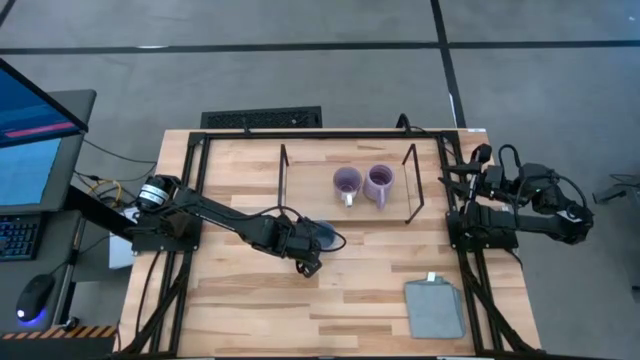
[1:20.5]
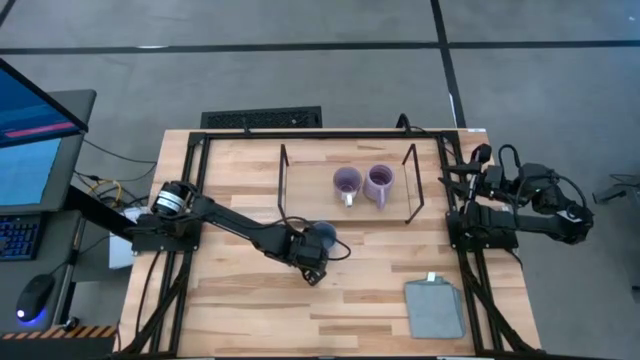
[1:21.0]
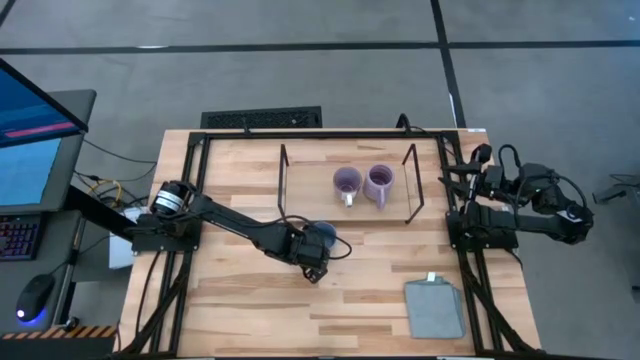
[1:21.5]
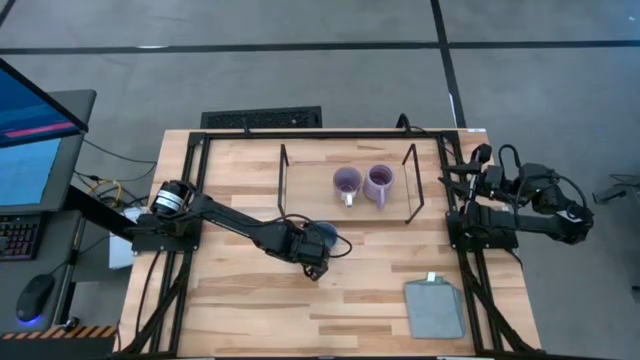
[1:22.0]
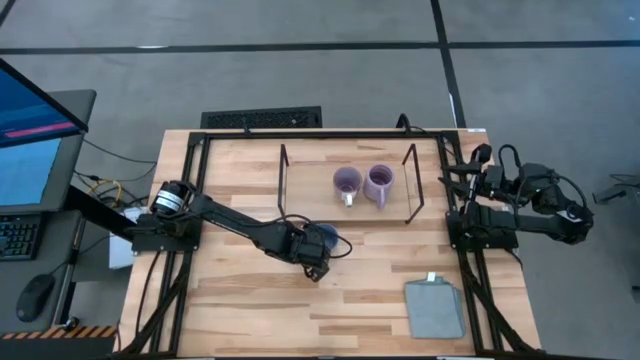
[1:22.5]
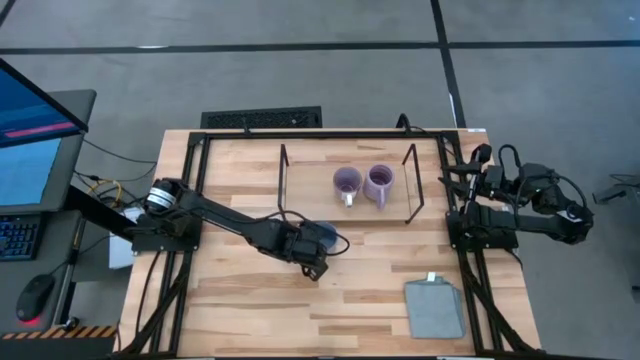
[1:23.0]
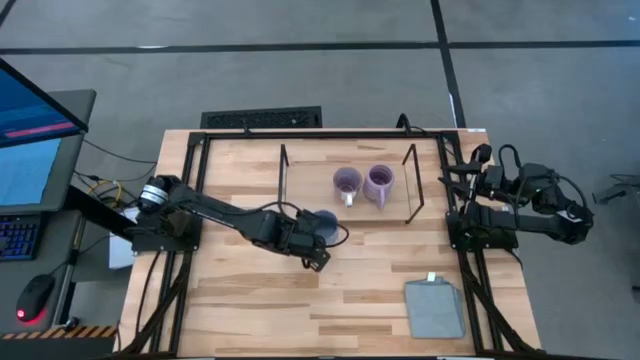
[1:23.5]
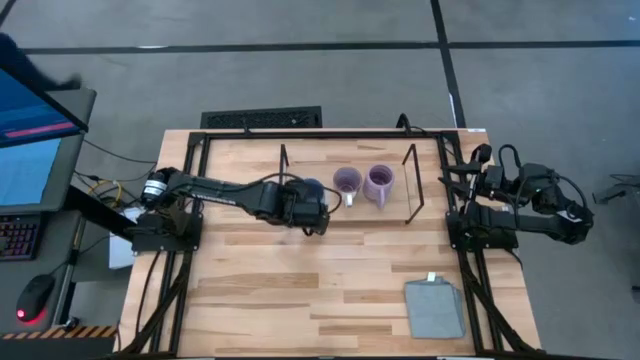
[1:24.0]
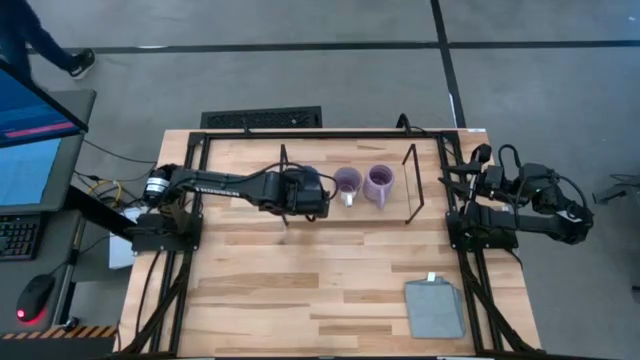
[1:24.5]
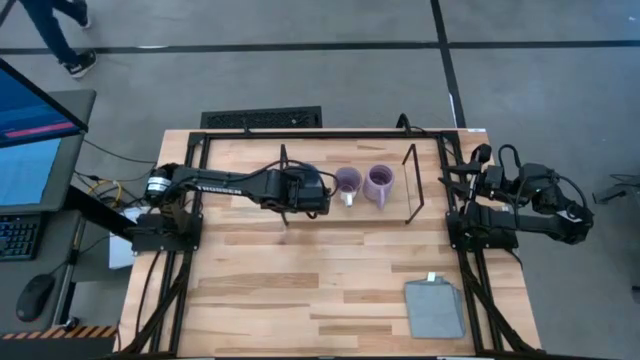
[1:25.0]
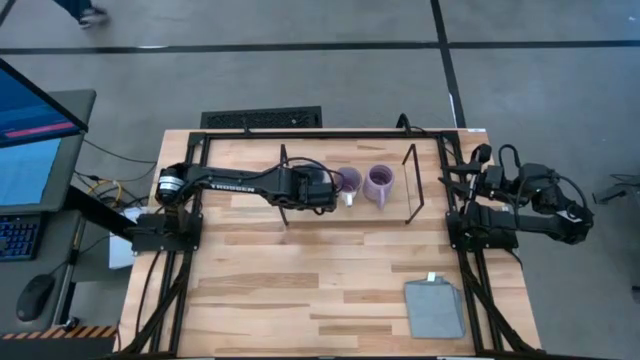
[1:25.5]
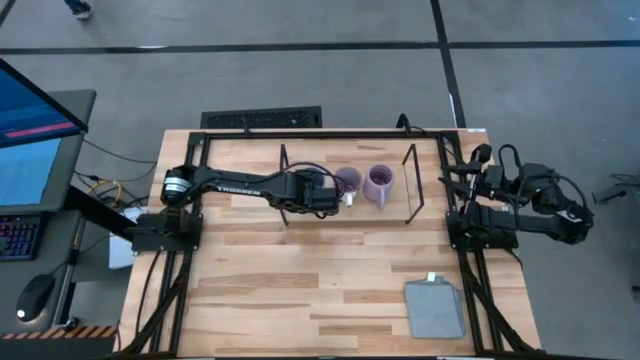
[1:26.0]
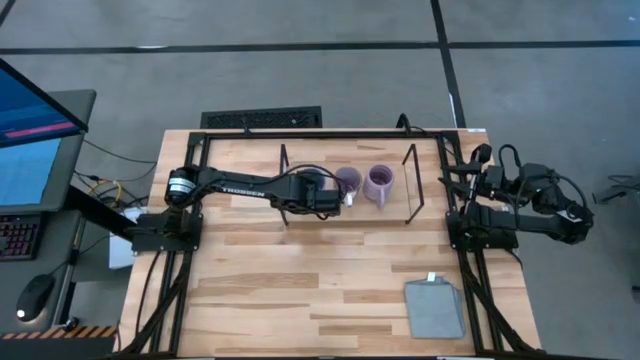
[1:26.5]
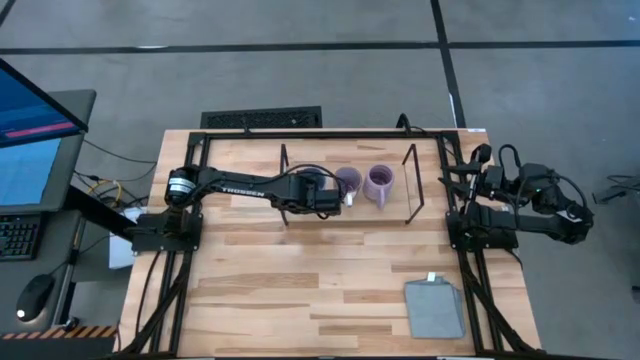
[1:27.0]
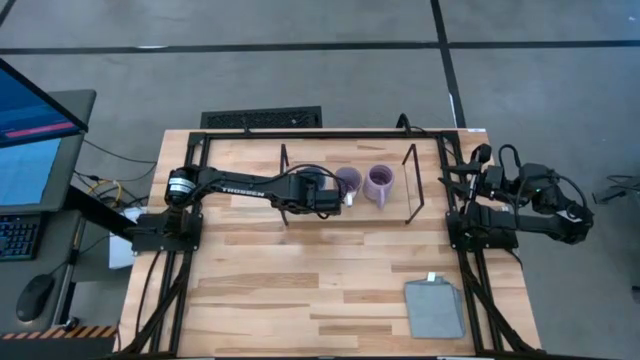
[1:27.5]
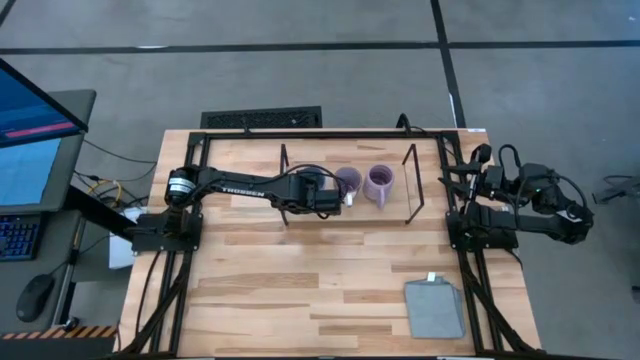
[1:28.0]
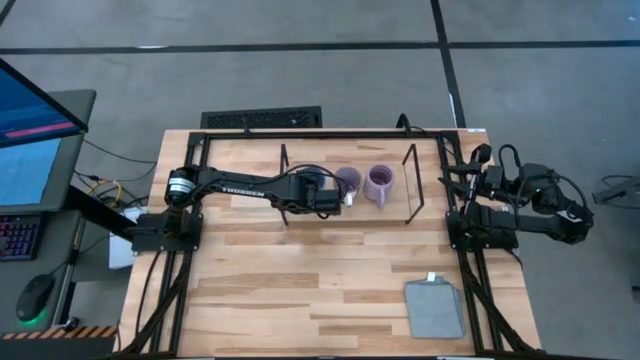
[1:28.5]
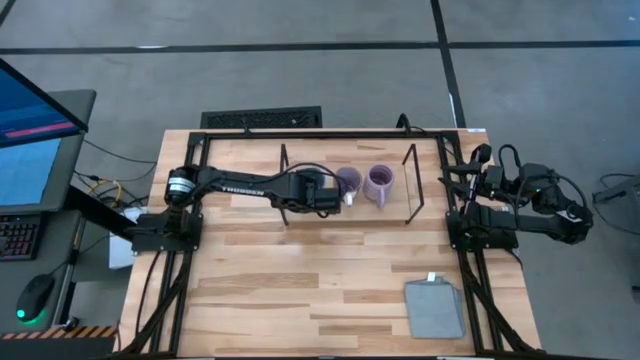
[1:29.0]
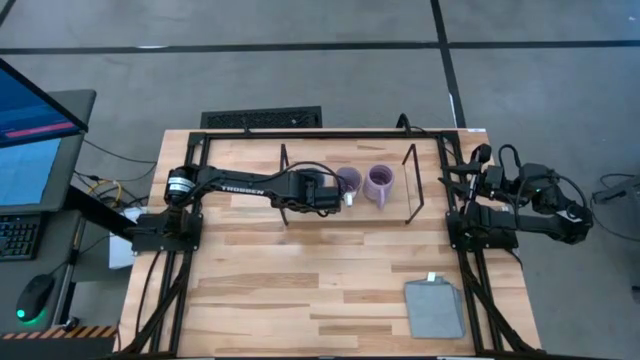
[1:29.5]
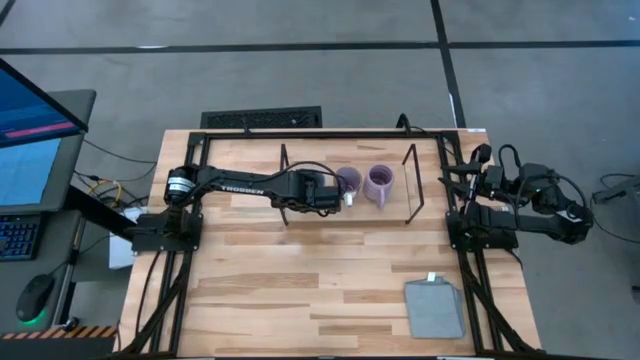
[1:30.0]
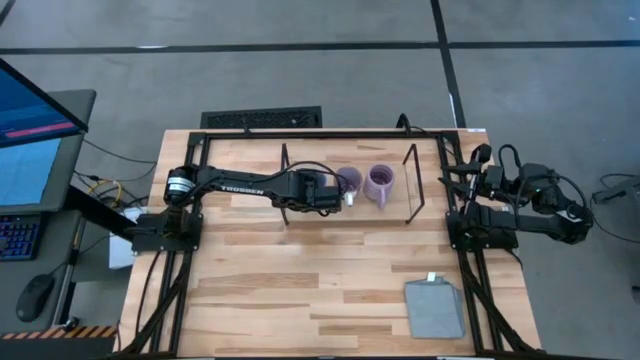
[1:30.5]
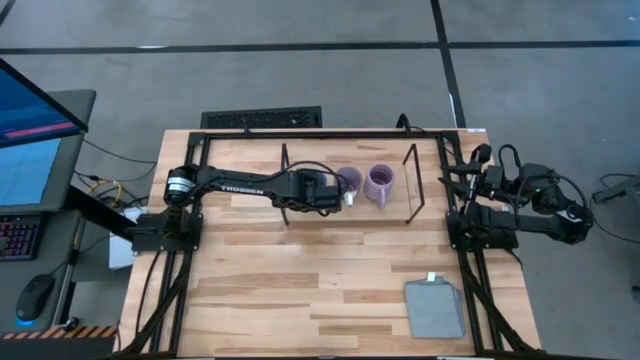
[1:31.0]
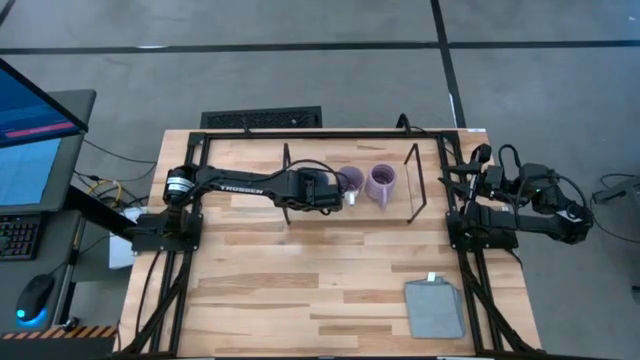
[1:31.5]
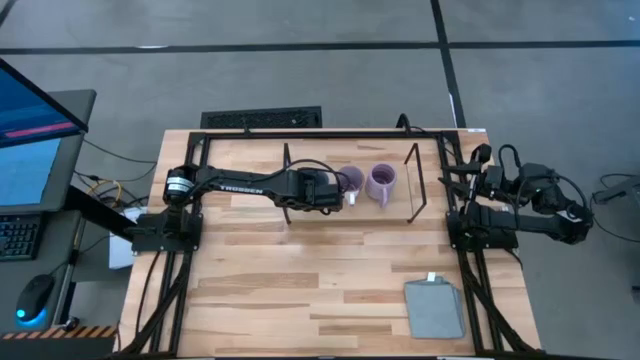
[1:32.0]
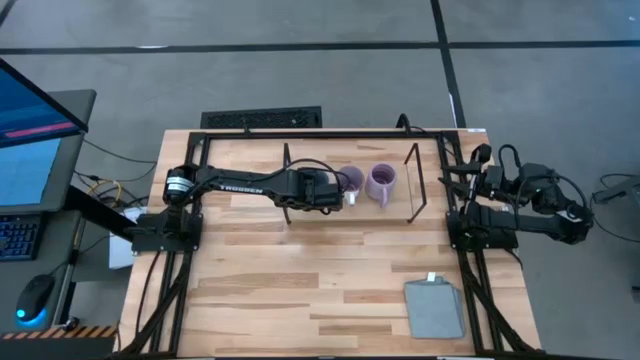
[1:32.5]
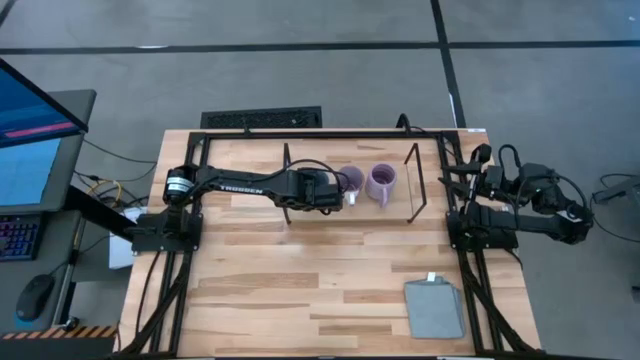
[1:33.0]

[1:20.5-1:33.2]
Task: Stack small to large cups/mugs on shelf
Put the blue mug on the shelf

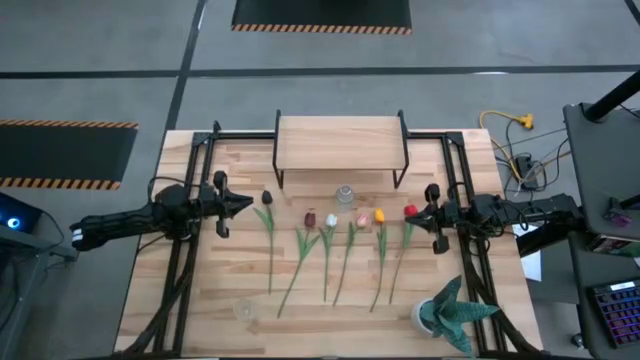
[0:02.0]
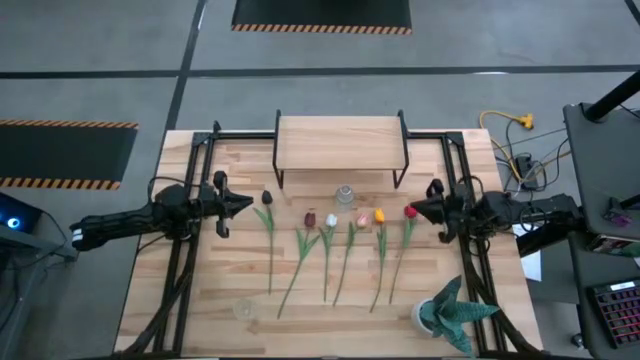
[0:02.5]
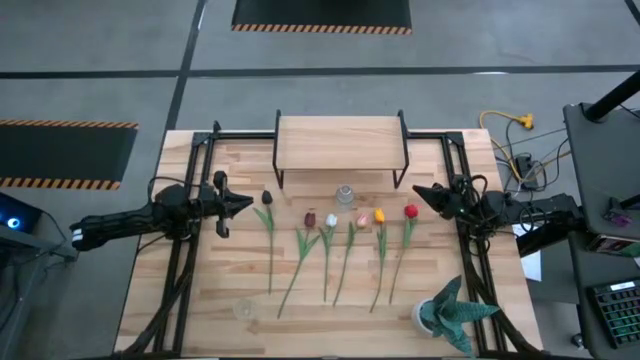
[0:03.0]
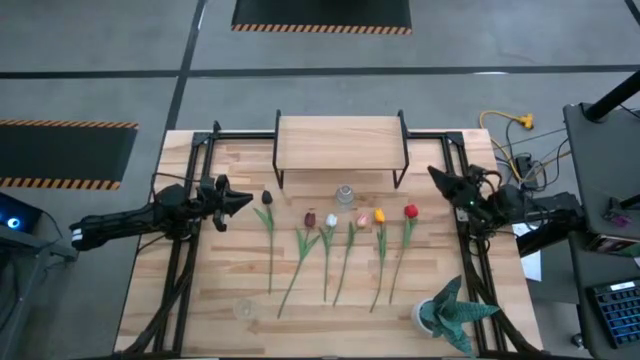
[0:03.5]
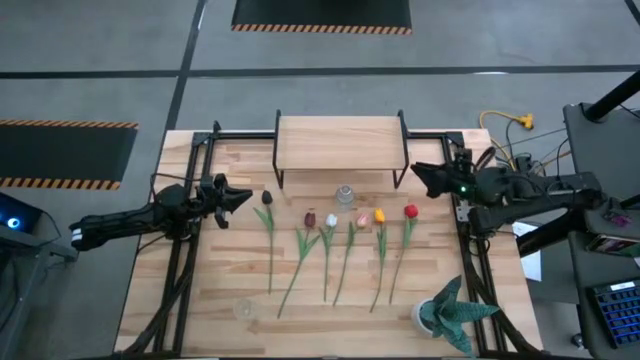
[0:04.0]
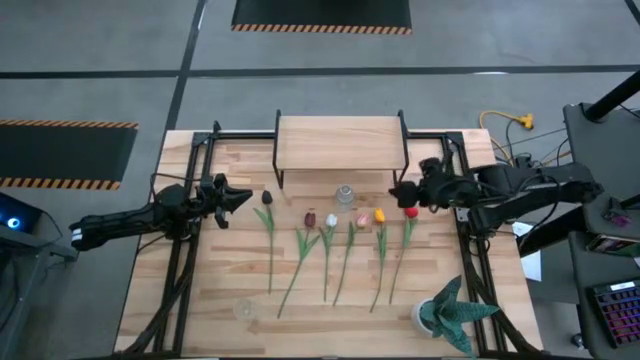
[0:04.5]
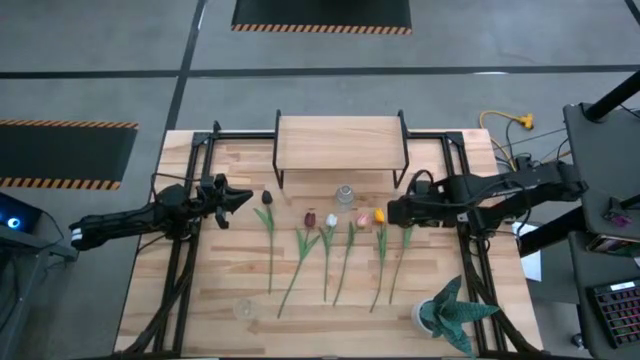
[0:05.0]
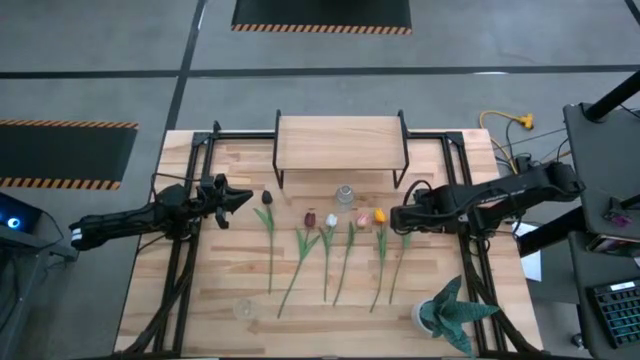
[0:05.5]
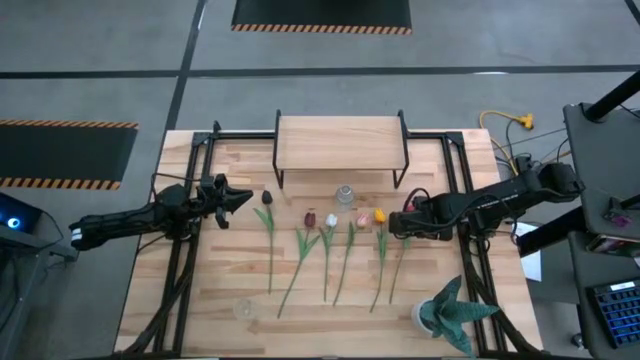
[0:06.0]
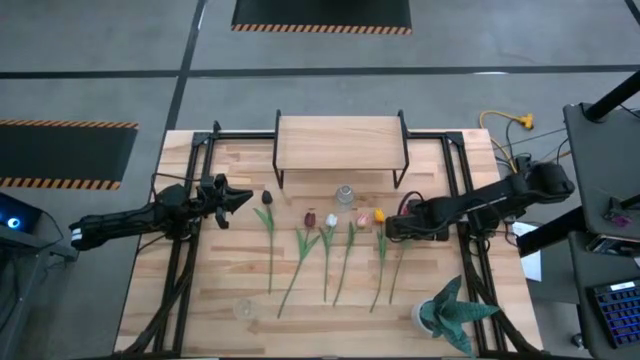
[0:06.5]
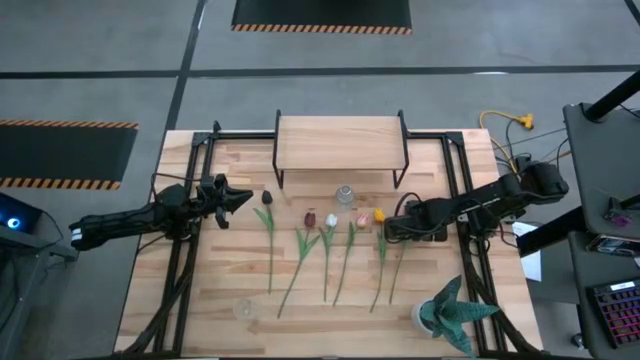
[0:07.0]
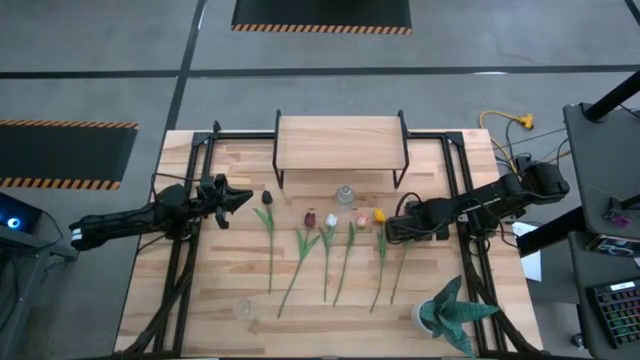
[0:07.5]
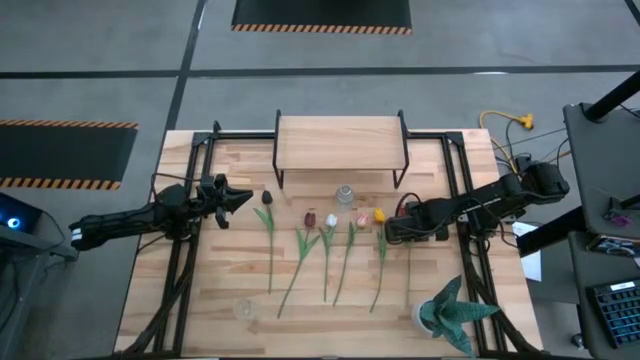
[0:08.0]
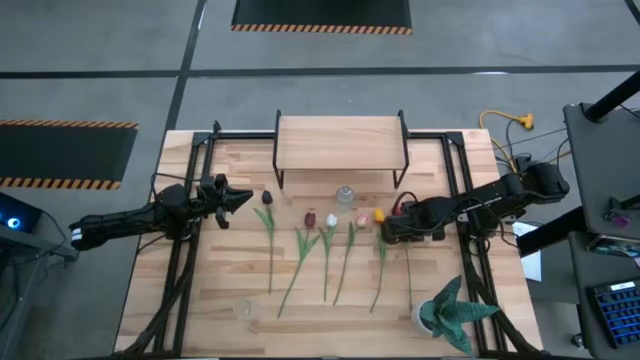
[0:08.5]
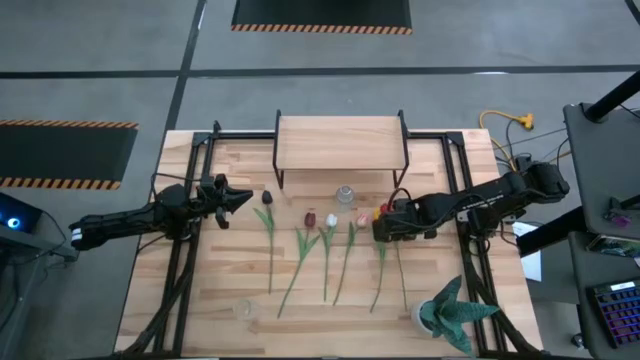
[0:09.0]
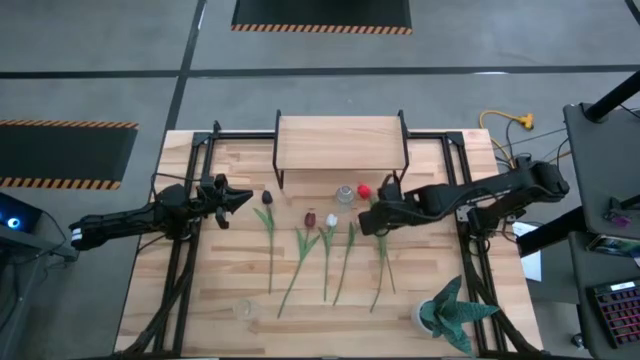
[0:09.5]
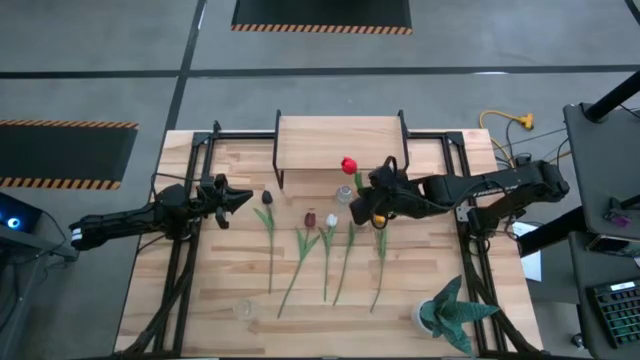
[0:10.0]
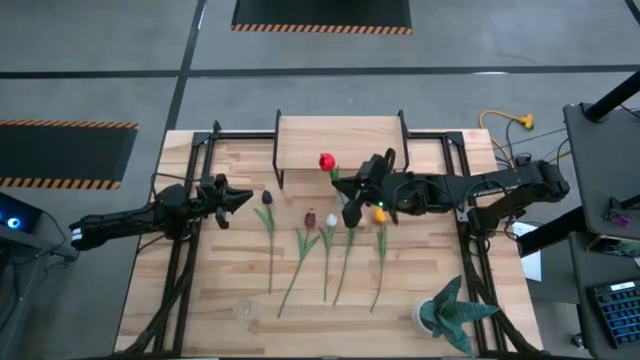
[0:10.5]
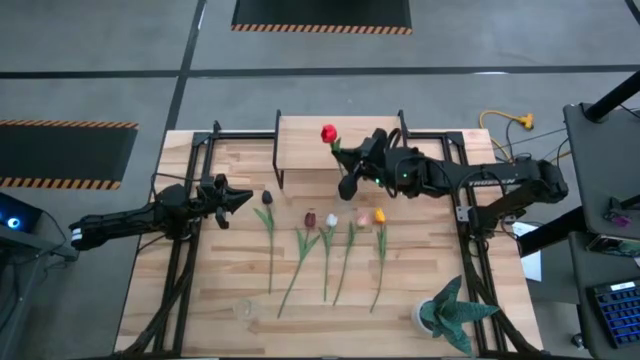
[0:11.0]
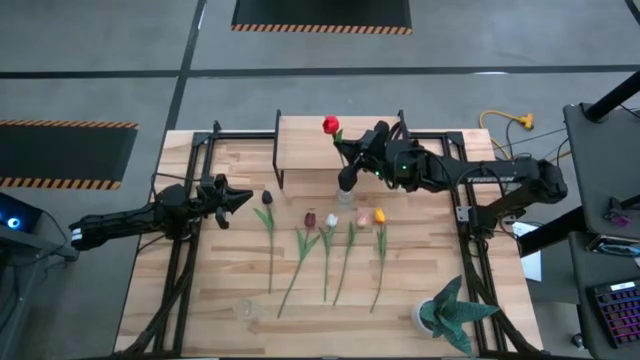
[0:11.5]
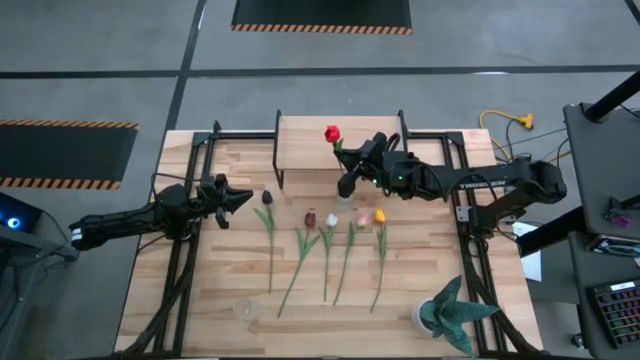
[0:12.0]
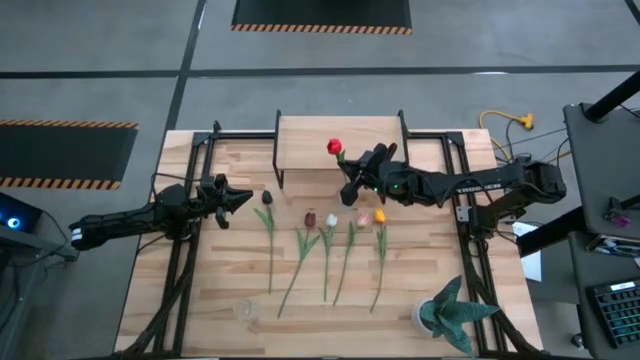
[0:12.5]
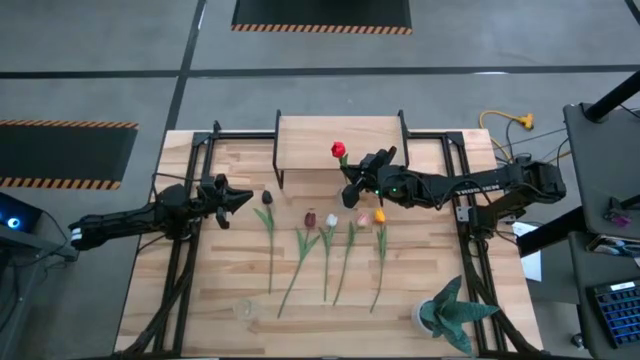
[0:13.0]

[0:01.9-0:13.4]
Task: Pick and place flowers into a vace then onto a shelf
Put the red tulip into the top transparent vase
